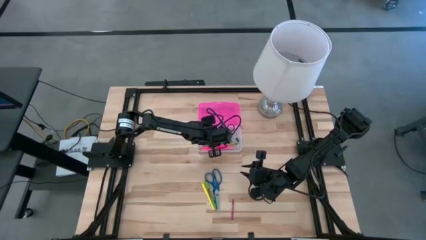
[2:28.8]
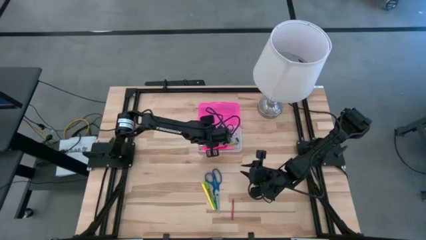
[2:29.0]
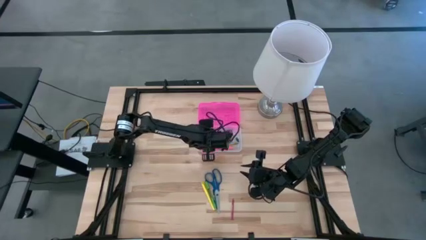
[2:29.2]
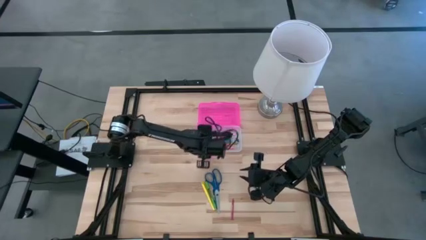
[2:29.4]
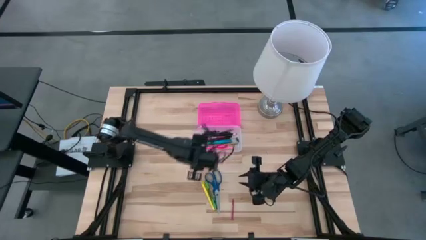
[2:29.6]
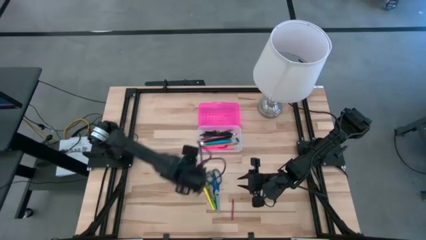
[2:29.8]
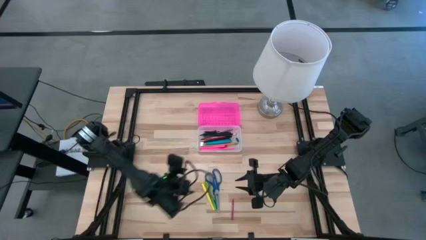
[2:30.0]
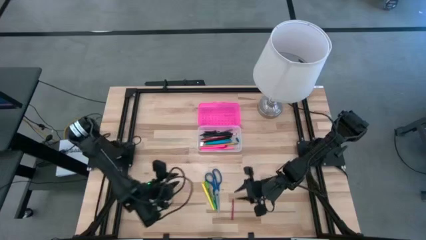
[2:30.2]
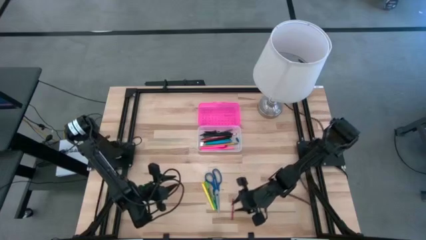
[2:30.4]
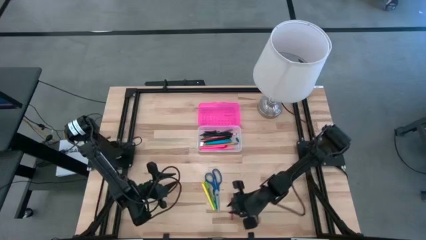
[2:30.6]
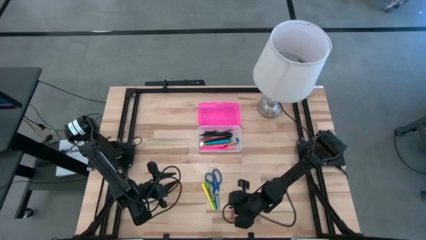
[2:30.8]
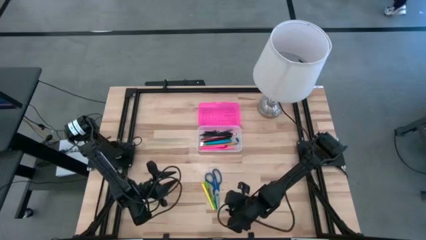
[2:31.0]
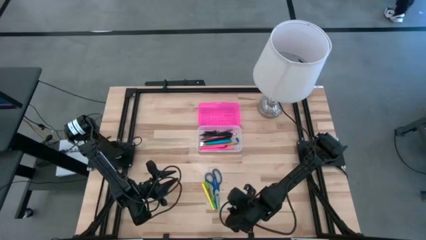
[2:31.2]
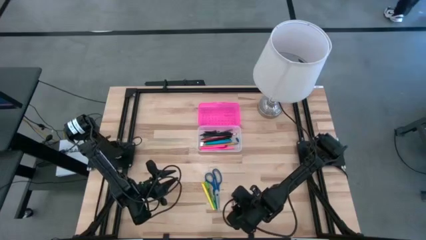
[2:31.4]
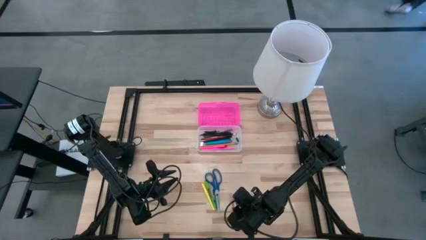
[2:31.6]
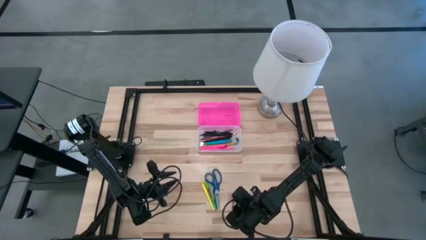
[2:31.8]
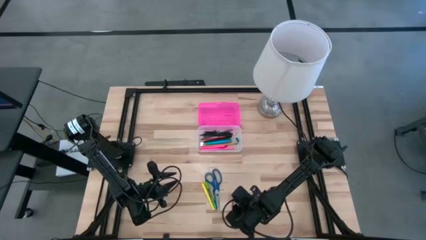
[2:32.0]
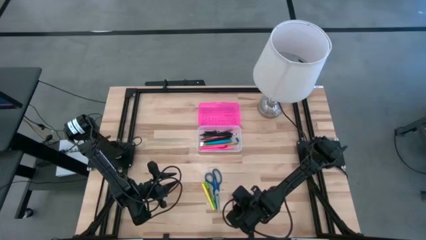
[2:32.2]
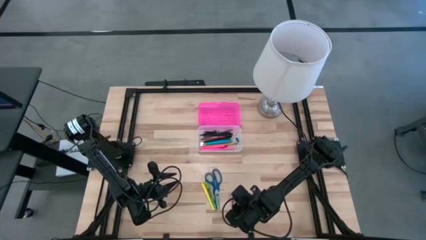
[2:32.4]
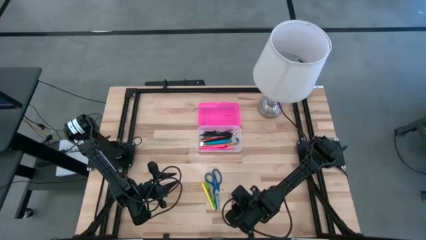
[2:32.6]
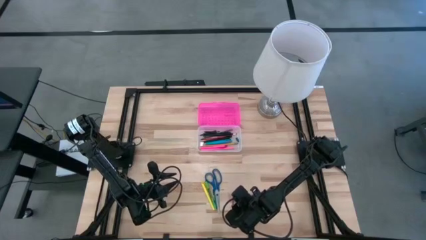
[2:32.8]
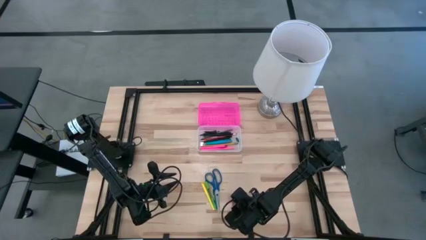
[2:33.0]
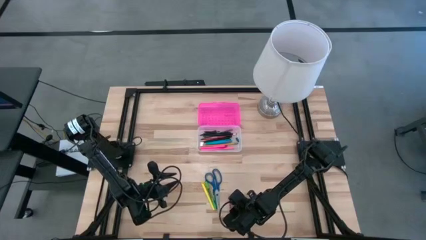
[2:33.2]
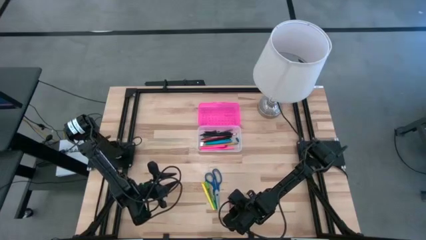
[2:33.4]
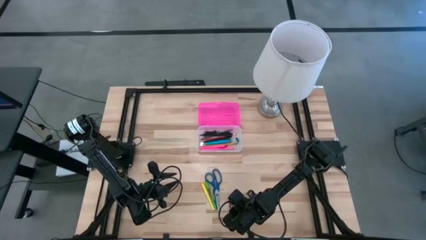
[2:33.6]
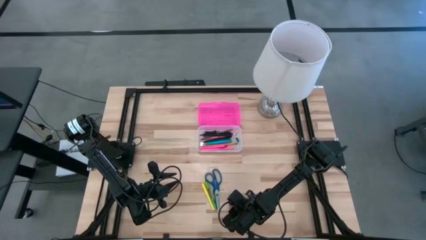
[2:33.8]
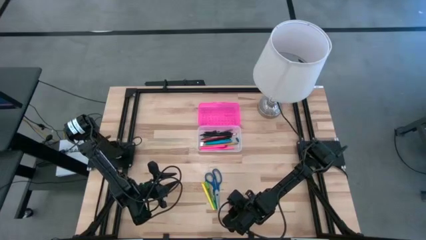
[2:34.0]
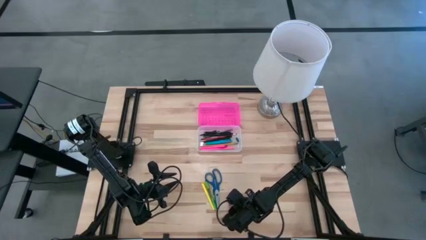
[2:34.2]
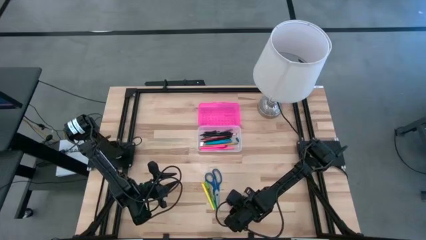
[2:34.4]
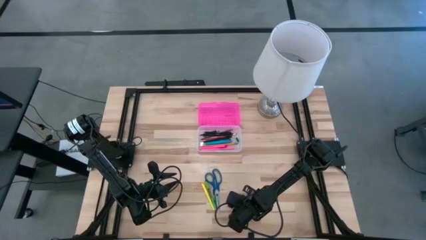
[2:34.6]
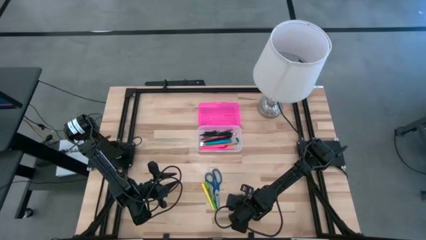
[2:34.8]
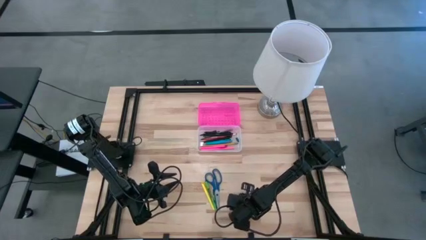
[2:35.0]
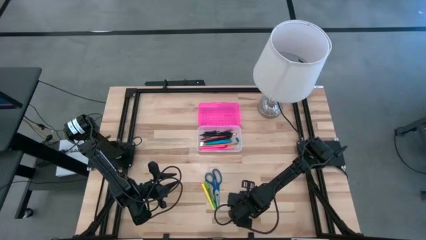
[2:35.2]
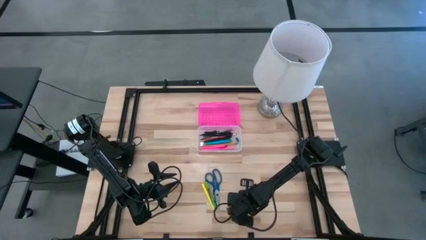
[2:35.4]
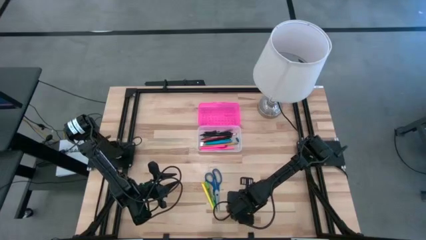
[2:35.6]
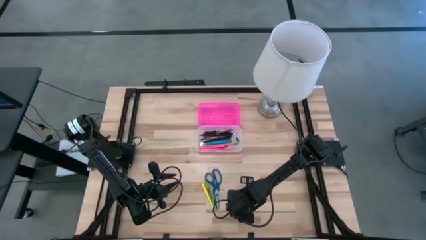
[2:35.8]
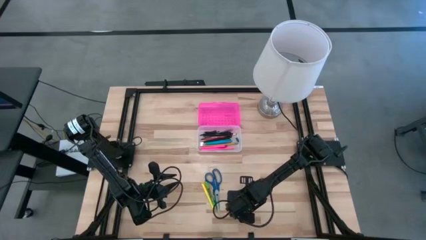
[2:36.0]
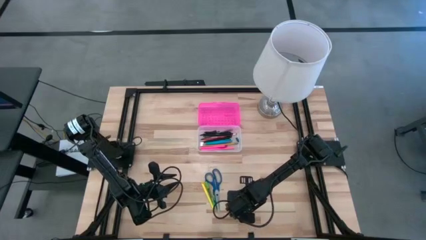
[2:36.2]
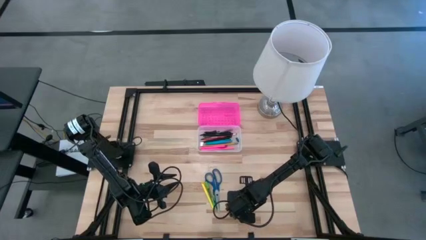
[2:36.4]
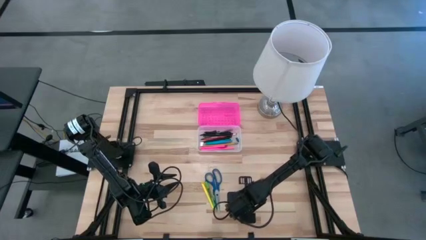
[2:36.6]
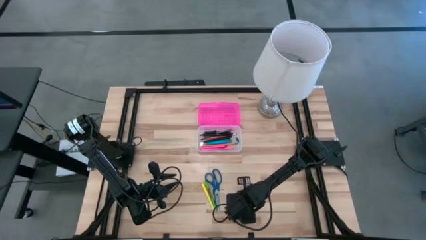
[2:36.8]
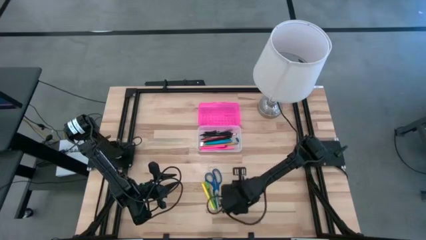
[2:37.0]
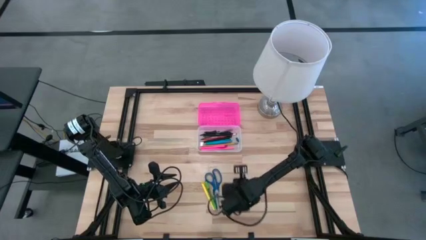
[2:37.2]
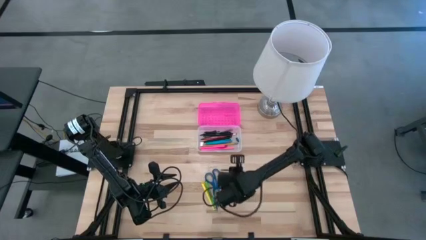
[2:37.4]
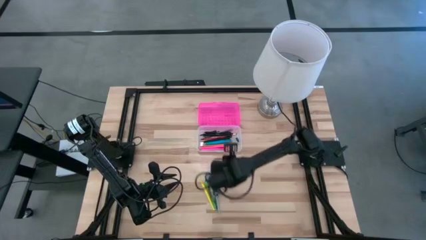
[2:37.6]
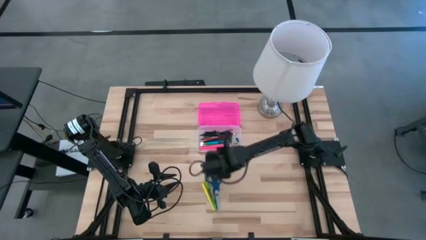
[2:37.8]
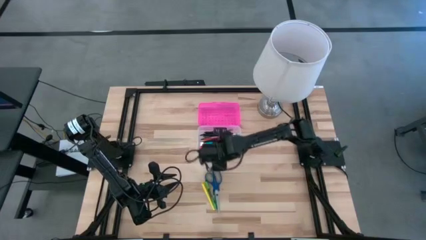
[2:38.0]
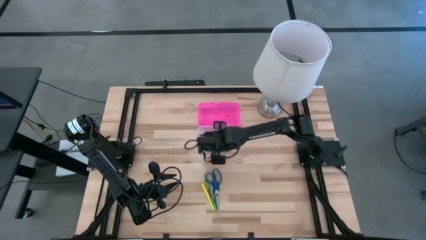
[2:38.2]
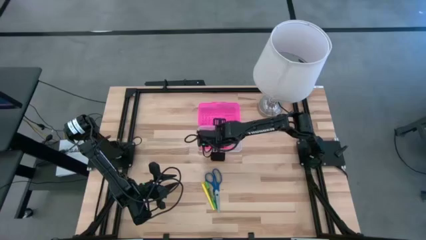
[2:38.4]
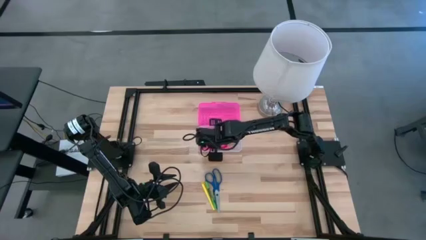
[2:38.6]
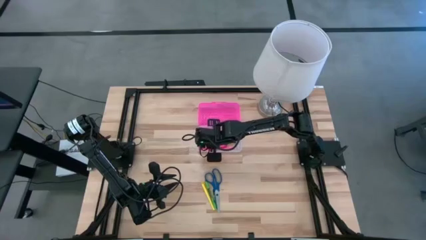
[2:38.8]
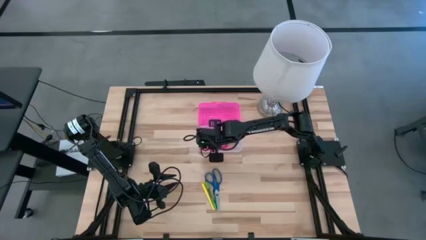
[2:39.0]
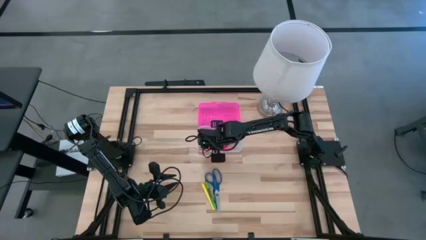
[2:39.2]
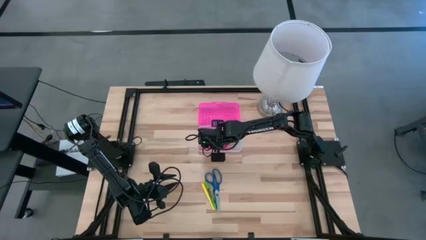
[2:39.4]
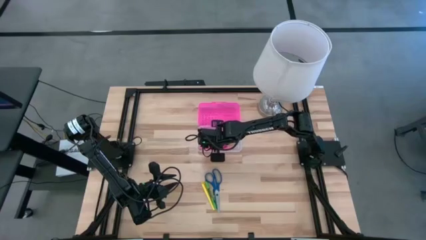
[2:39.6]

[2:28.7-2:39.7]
Task: Pick & place school supplies into a supply box
Put the red crayon into the supply box

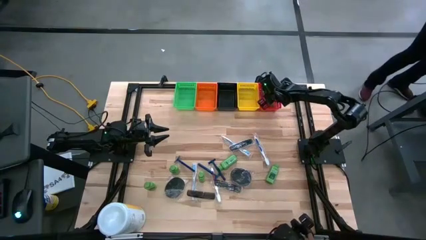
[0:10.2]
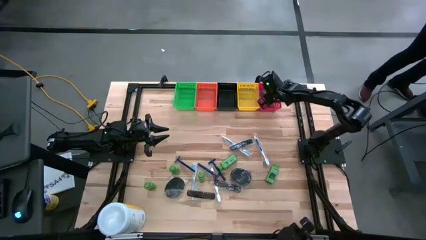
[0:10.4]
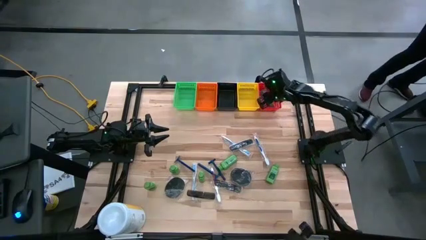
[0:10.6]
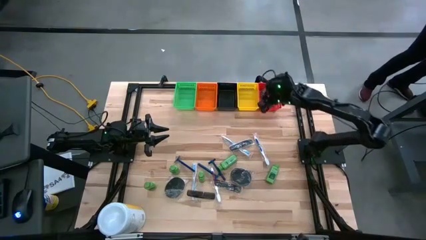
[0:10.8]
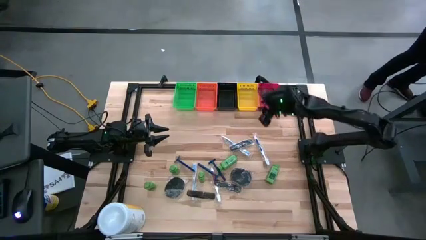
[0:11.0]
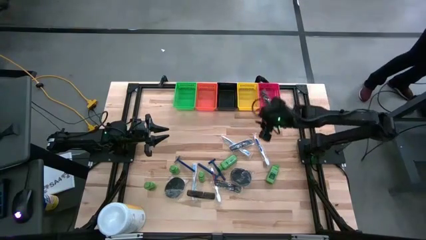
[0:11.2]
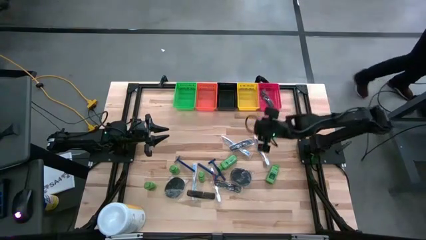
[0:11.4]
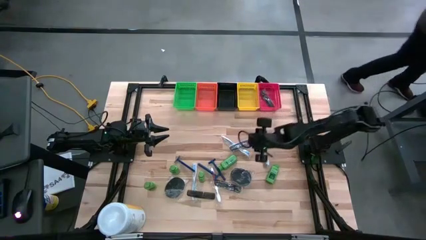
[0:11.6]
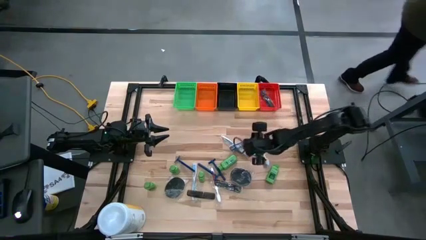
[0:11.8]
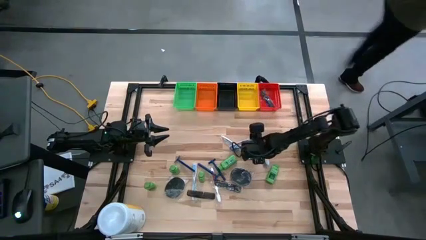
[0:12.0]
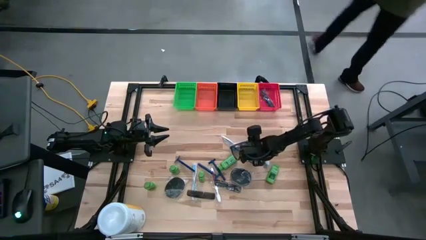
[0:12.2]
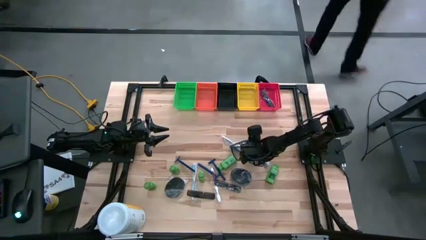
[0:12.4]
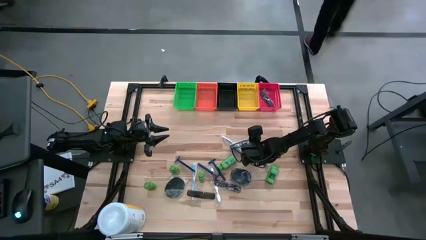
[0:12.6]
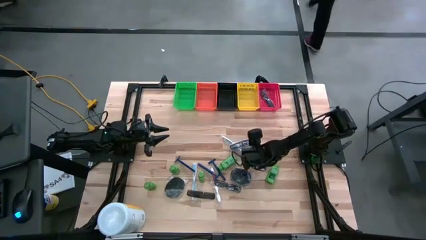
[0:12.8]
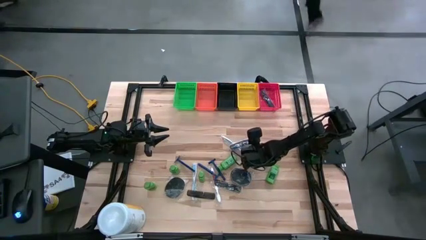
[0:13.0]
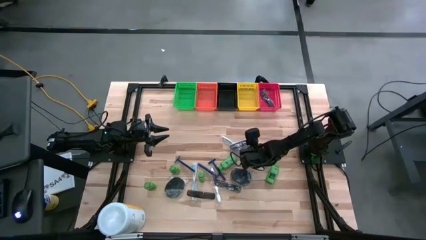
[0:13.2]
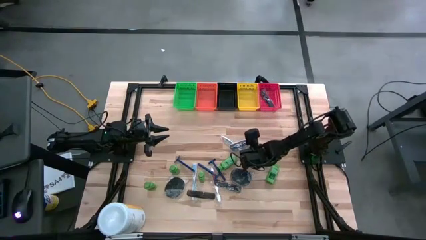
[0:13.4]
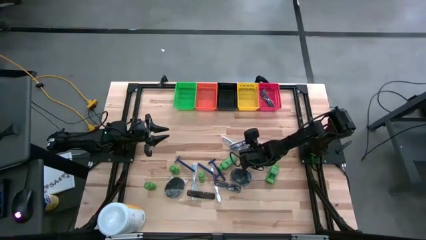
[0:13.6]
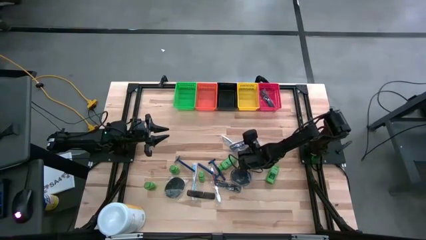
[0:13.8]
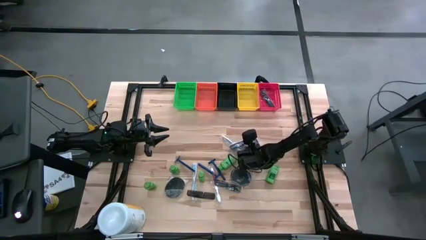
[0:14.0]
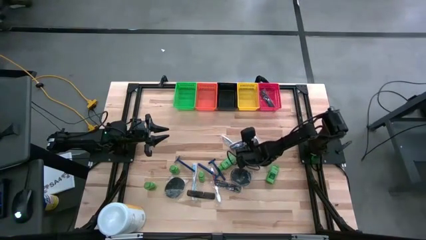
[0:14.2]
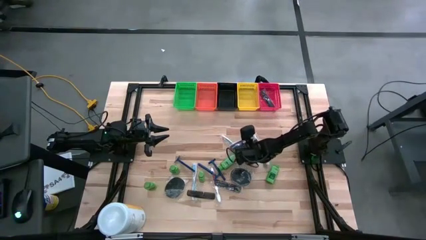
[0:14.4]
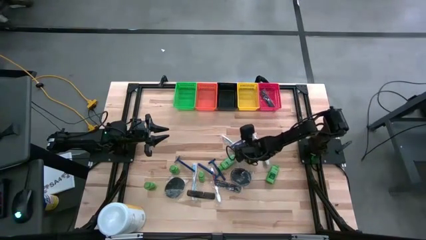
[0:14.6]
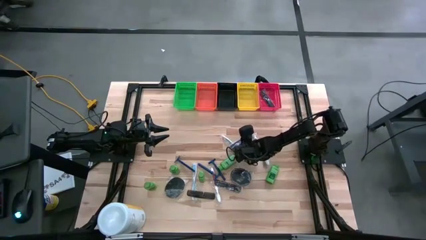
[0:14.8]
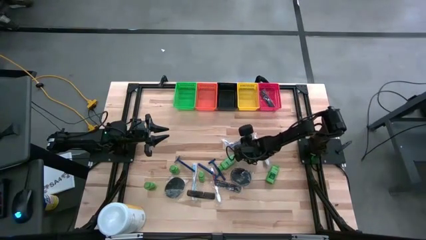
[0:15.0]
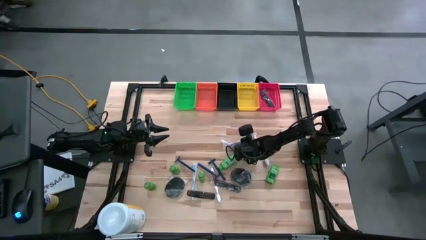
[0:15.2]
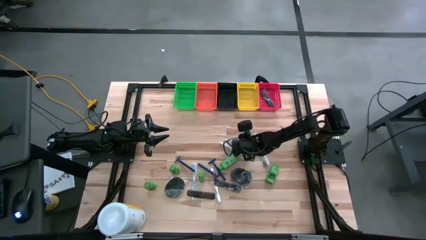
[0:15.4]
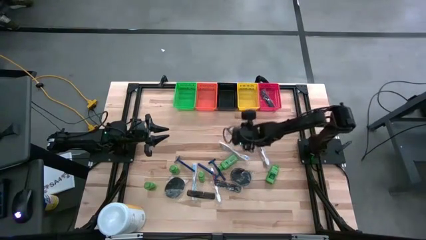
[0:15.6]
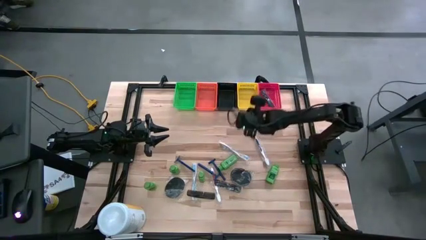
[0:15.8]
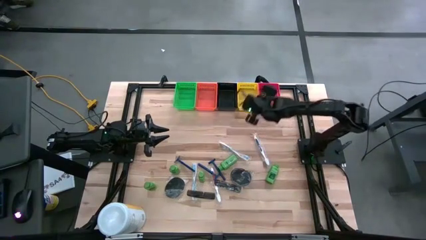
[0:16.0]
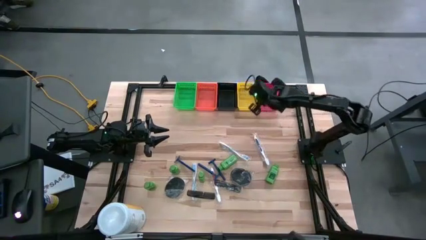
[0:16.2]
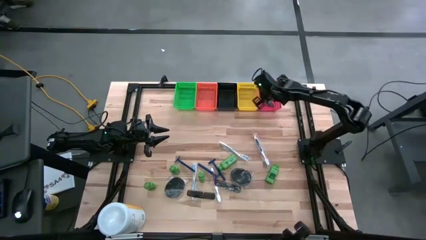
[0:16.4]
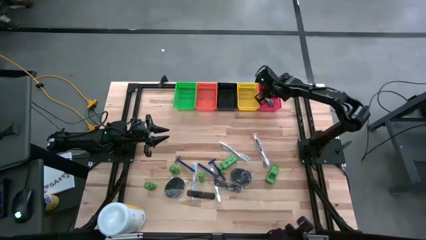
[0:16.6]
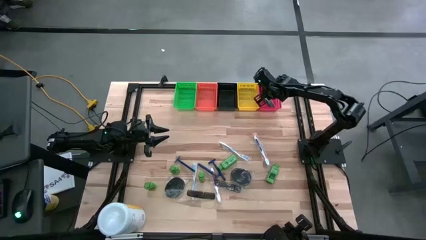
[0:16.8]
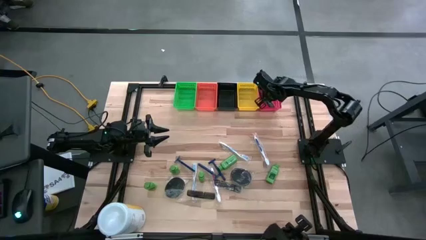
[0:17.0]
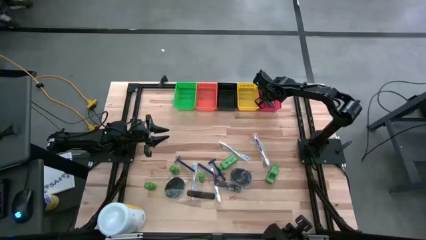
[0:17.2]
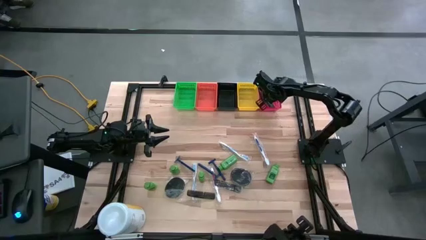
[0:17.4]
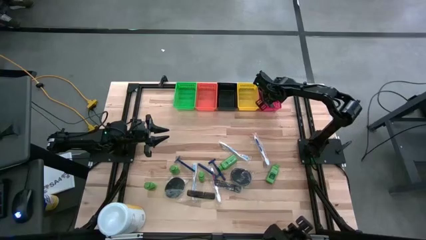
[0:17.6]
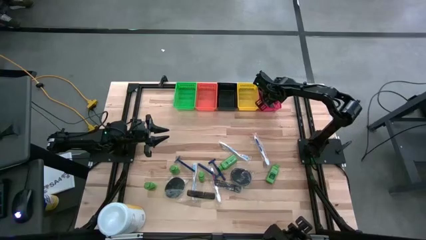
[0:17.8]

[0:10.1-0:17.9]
Task: Pick & Place Travel size toiletries
Put the black comb into the red bin
